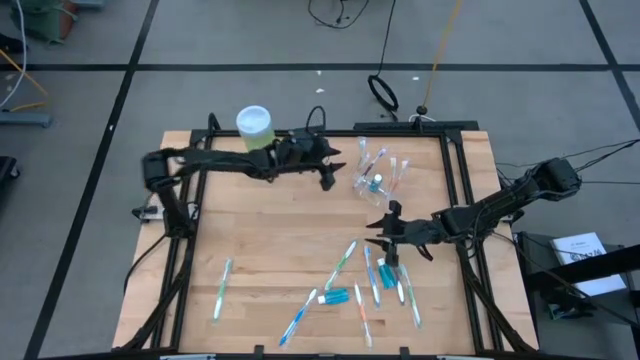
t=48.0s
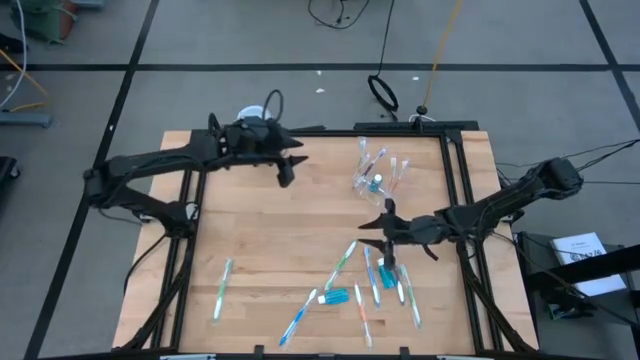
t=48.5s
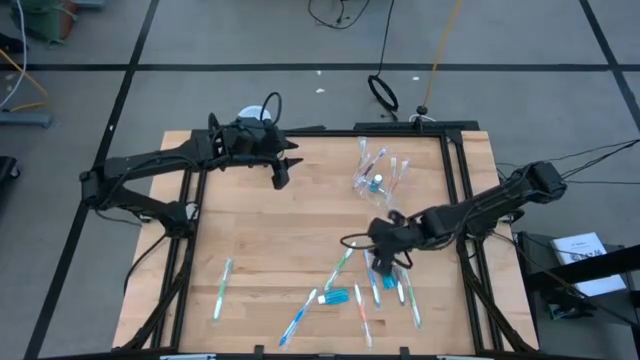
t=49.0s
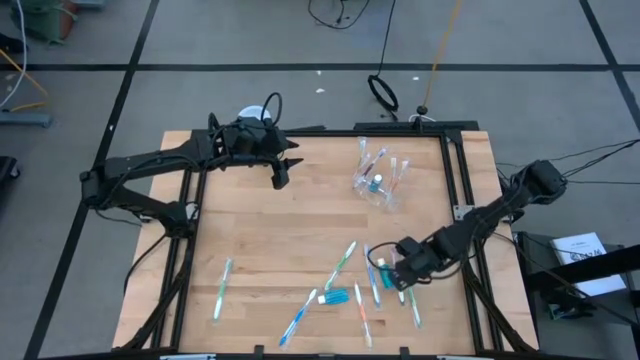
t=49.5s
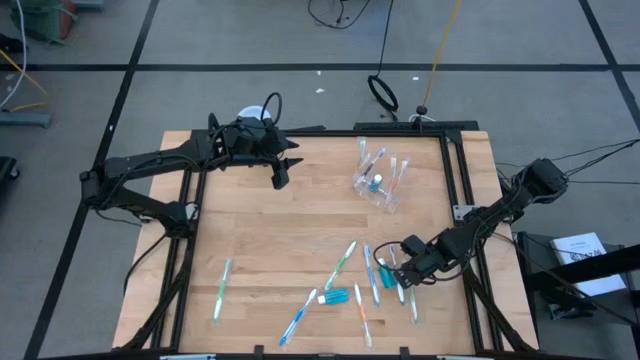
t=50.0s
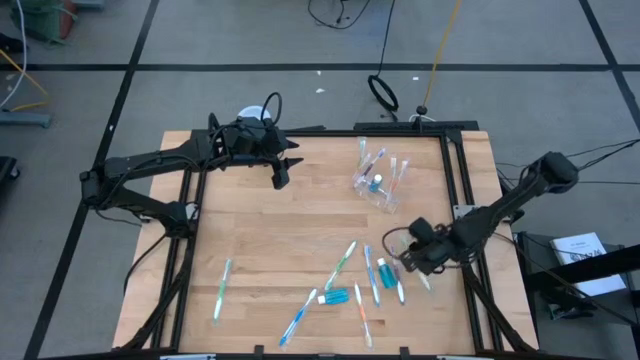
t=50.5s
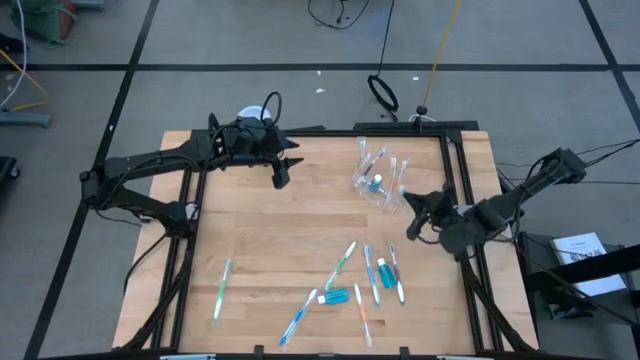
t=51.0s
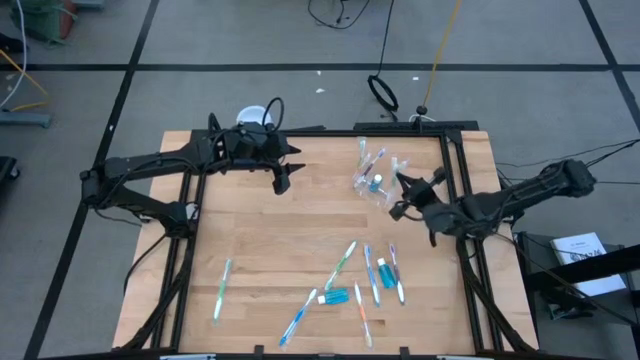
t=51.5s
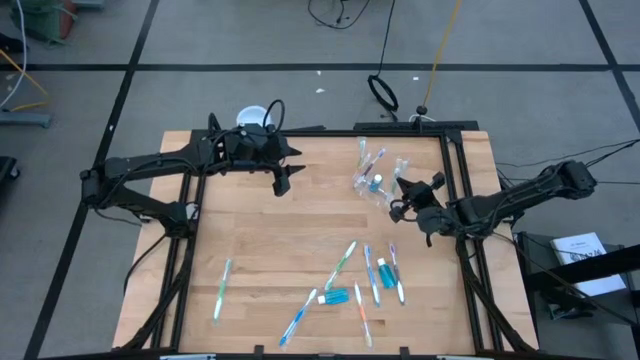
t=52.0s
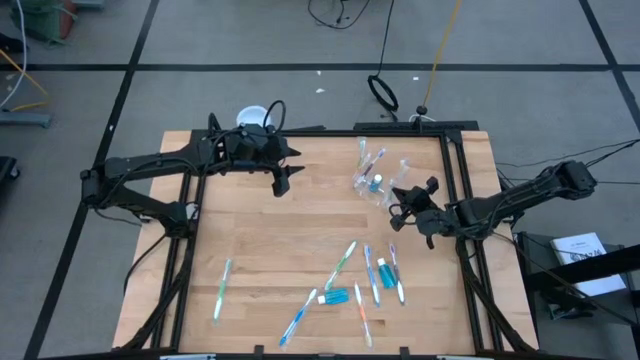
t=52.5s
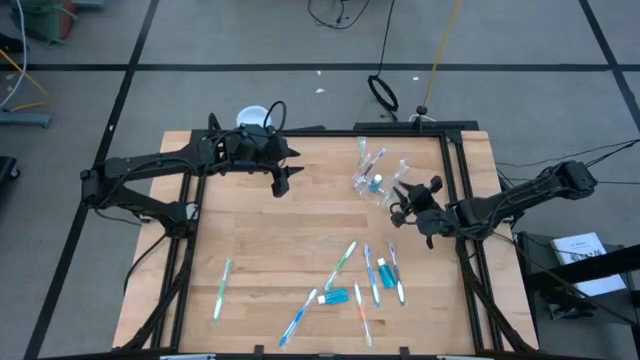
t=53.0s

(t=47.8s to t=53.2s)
Task: Pick & Place toothbrushing station
Put the green toothbrush into the transparent organizer

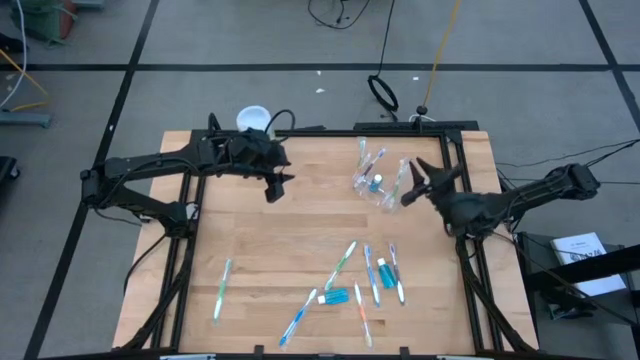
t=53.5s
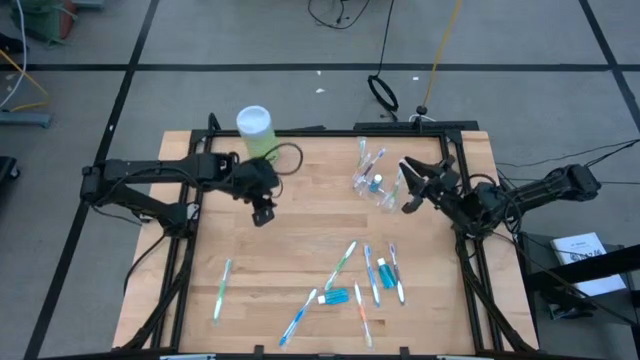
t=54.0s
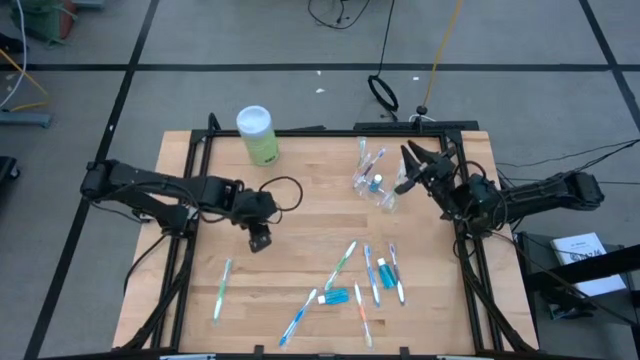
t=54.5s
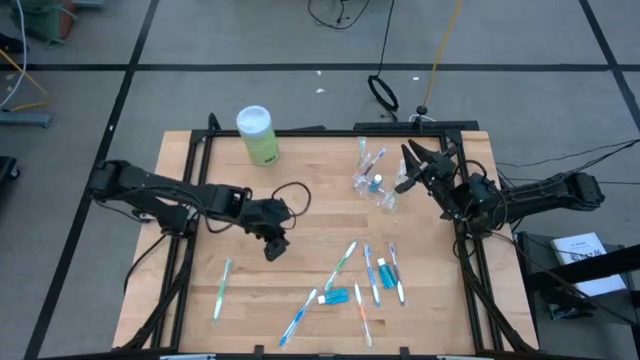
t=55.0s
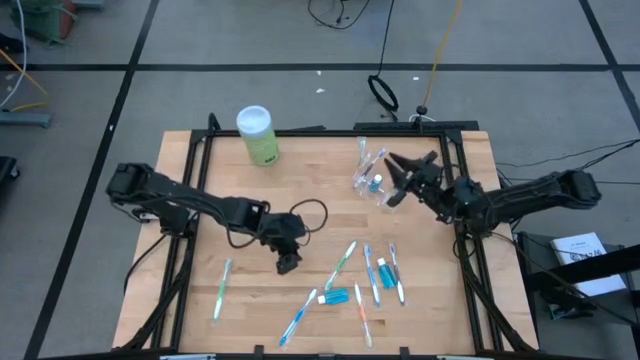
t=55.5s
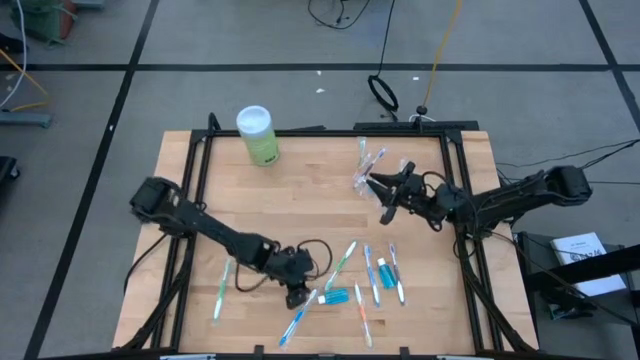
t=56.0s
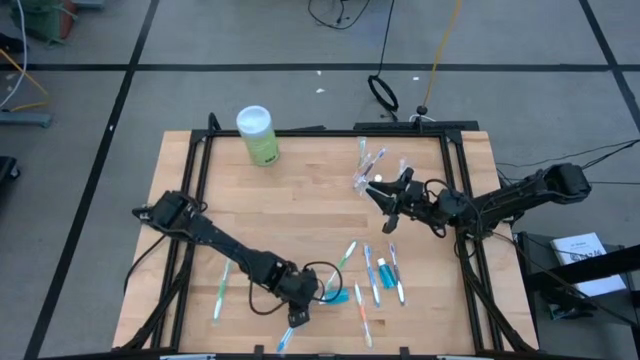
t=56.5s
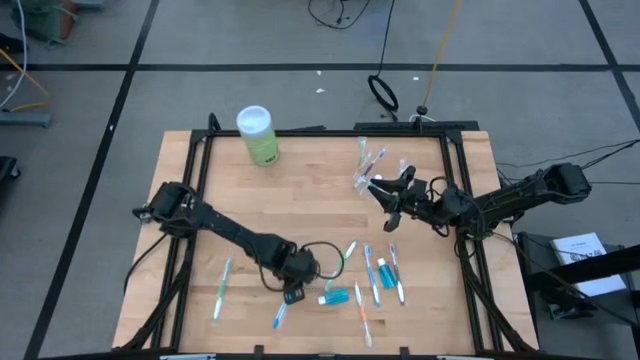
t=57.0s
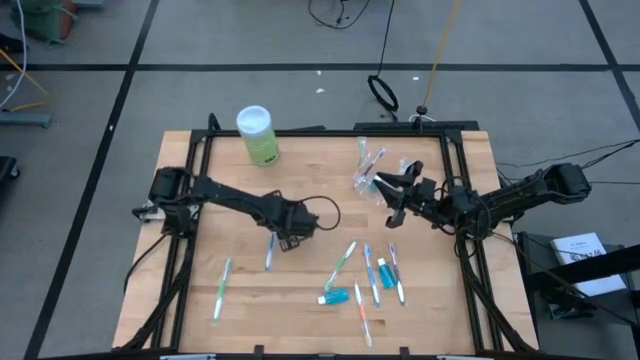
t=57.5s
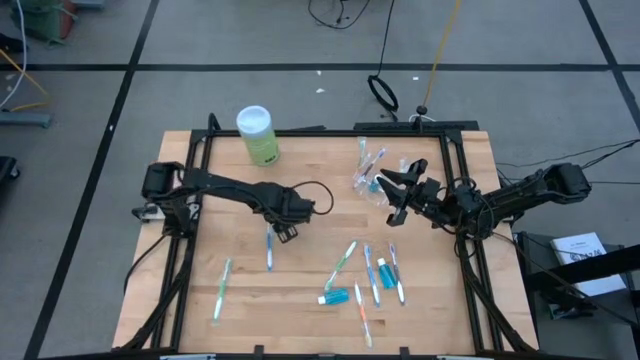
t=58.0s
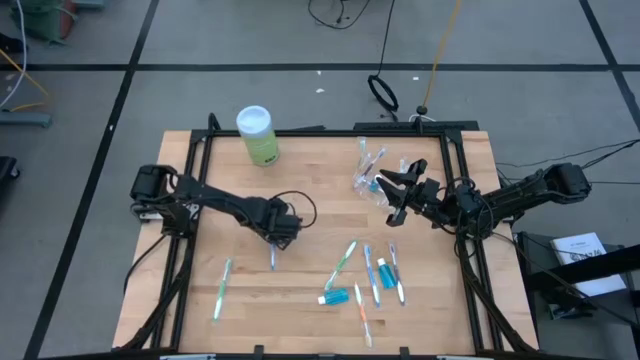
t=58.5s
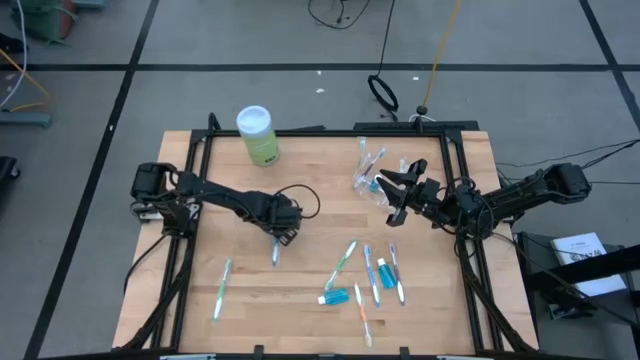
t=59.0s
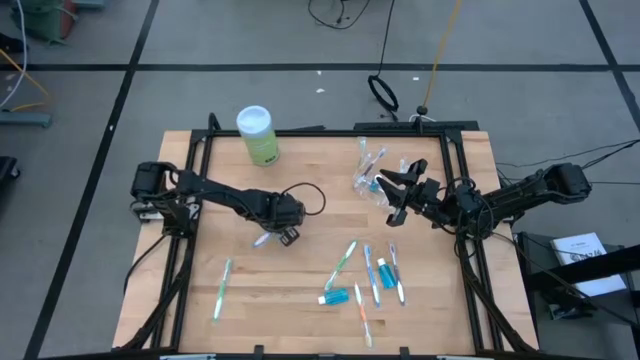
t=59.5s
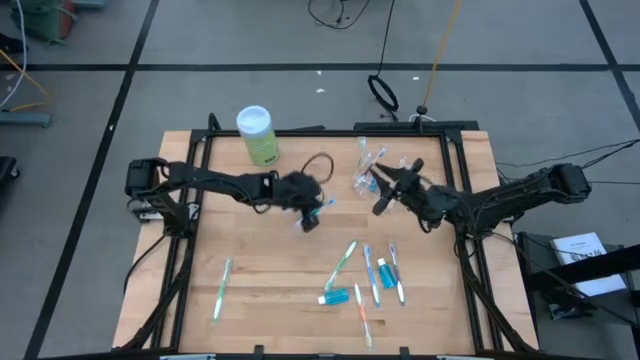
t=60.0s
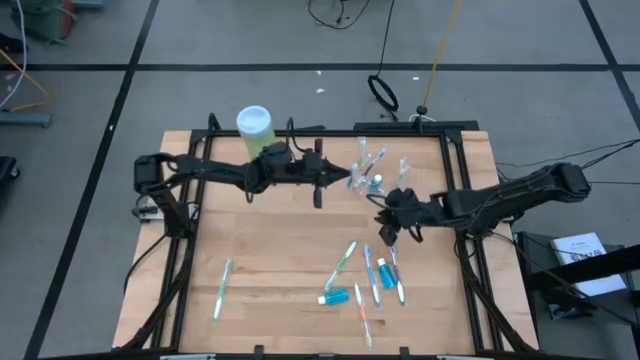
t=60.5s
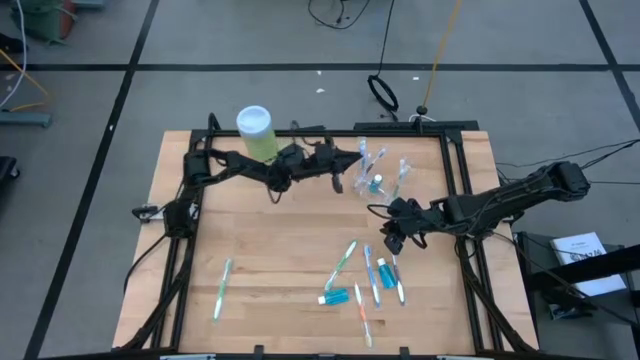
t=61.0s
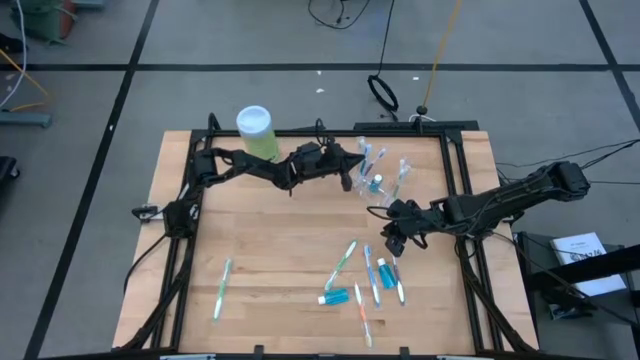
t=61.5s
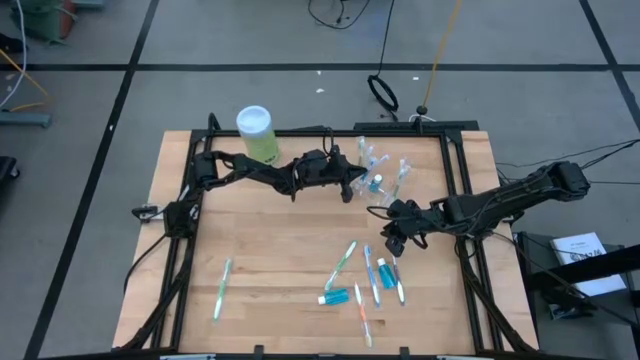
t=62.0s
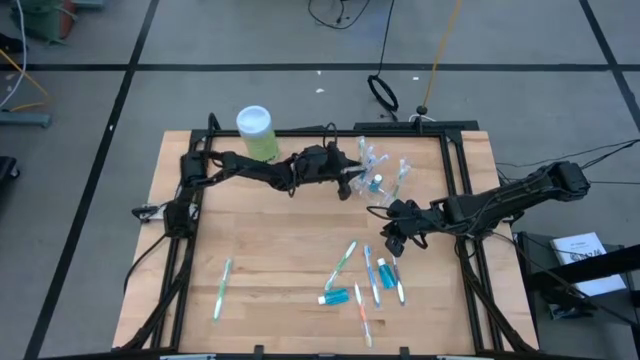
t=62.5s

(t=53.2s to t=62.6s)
Put the blue toothbrush into the transparent organizer

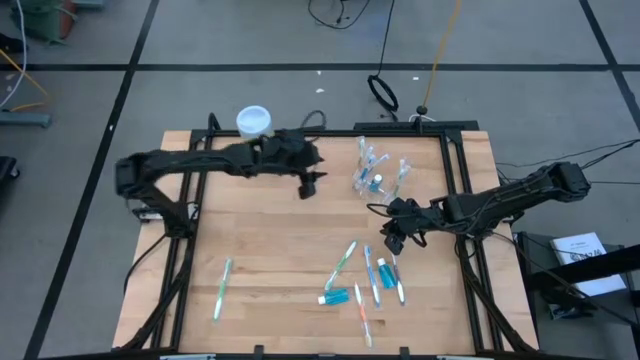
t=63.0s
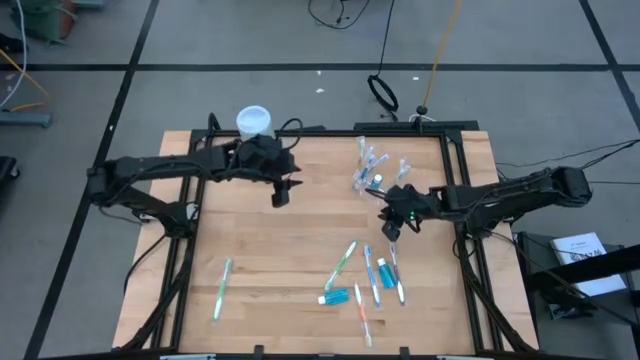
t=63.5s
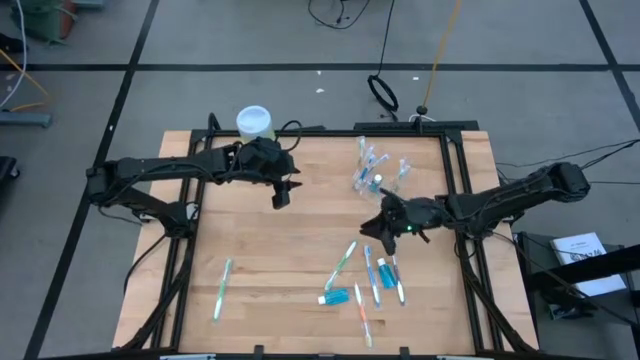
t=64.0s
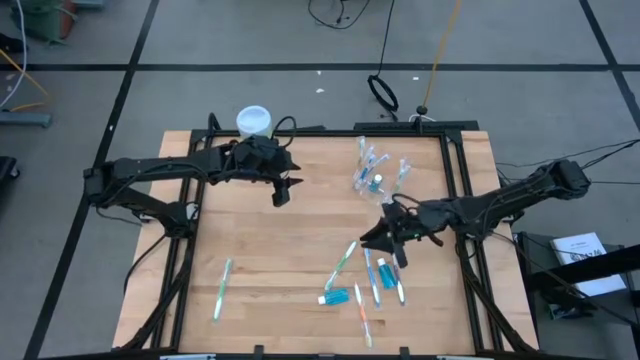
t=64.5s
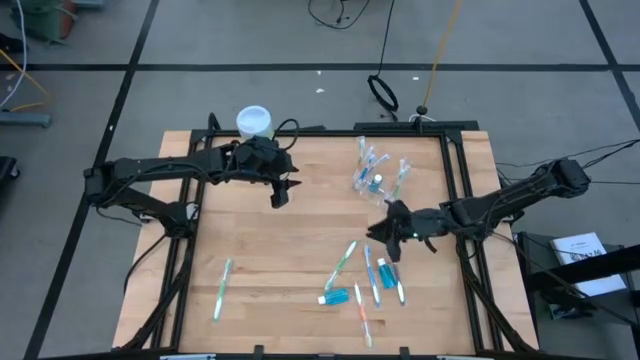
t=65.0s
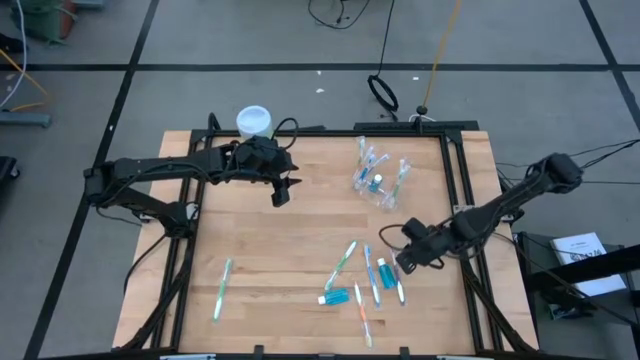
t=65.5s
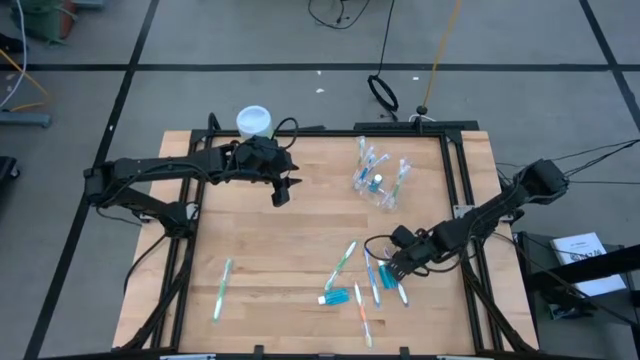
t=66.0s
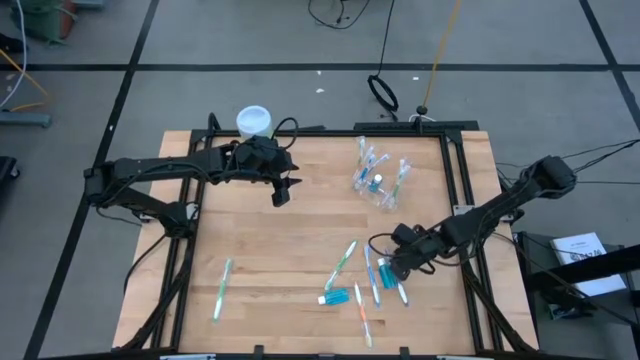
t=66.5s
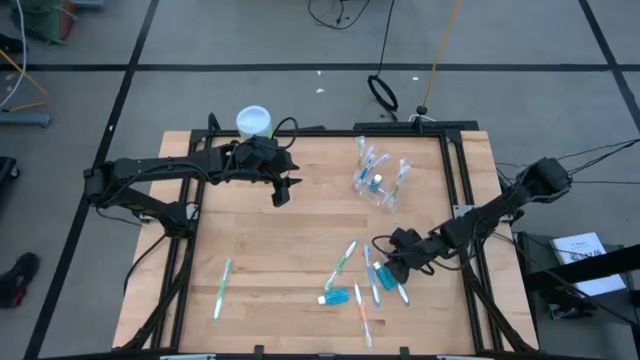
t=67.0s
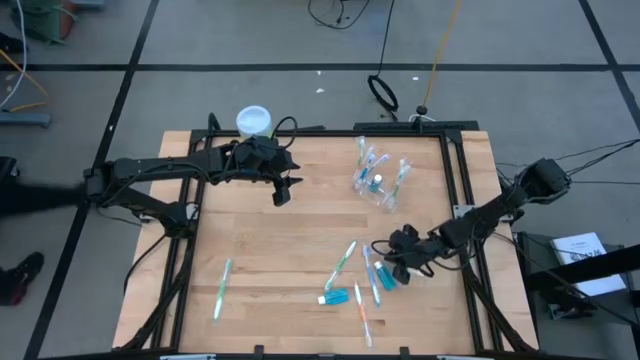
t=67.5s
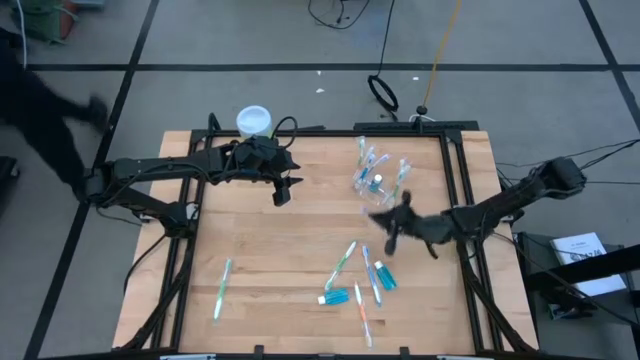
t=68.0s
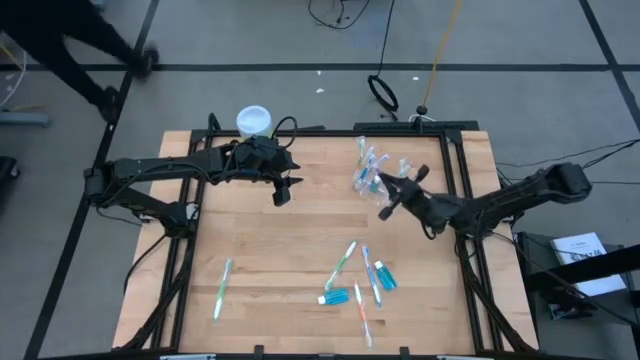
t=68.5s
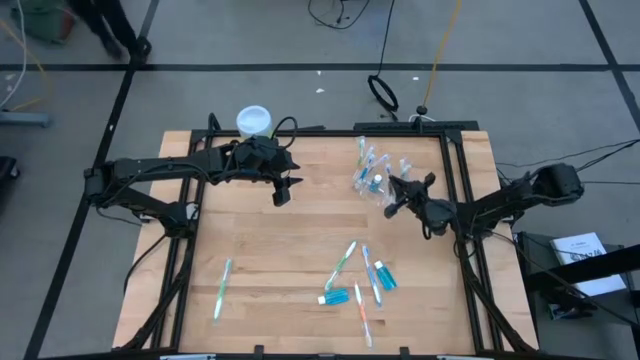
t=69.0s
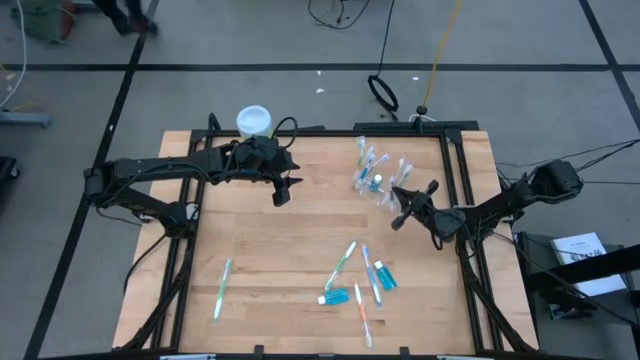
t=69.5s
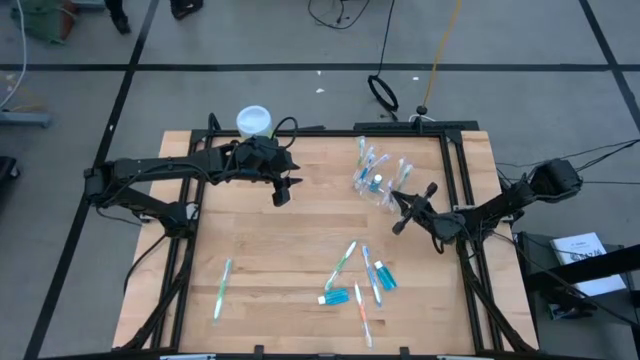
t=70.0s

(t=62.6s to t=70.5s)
Put the violet toothbrush into the transparent organizer

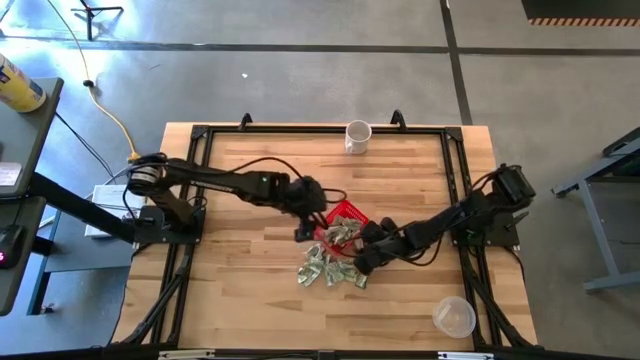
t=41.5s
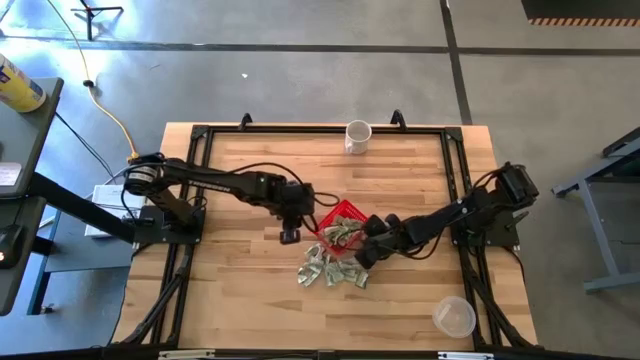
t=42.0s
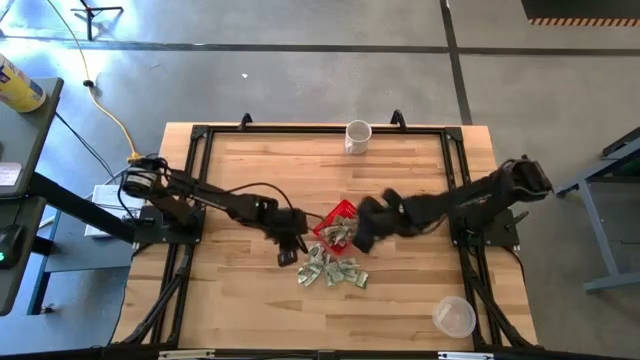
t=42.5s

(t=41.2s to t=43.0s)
Task: Pick and place items into bin
Put the green truvia packet into the red bin
